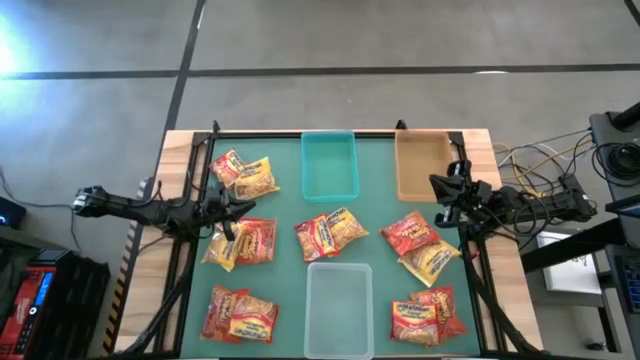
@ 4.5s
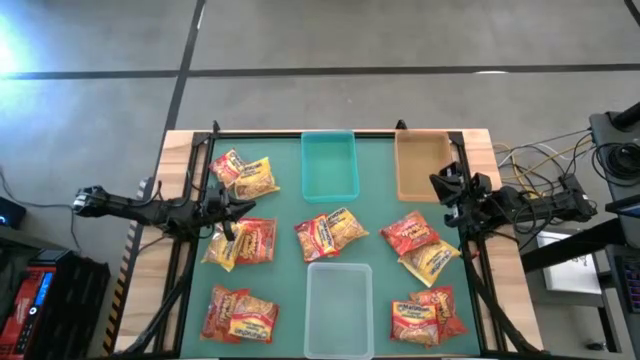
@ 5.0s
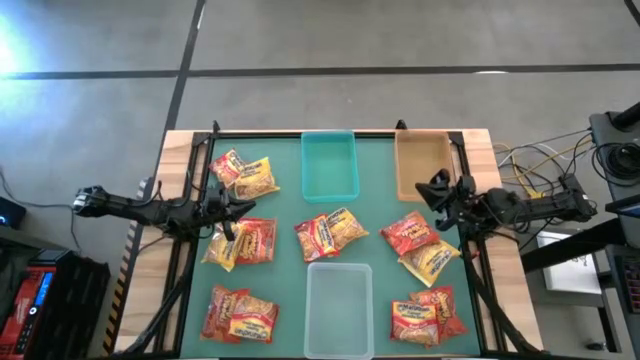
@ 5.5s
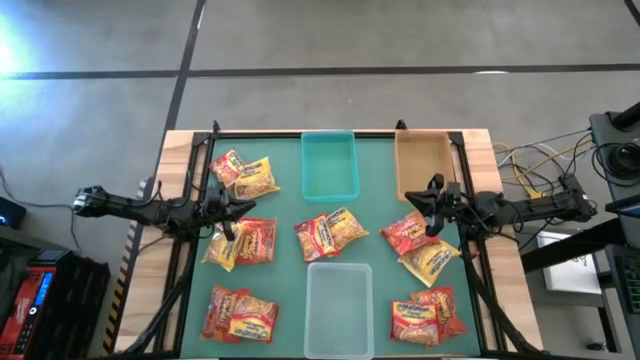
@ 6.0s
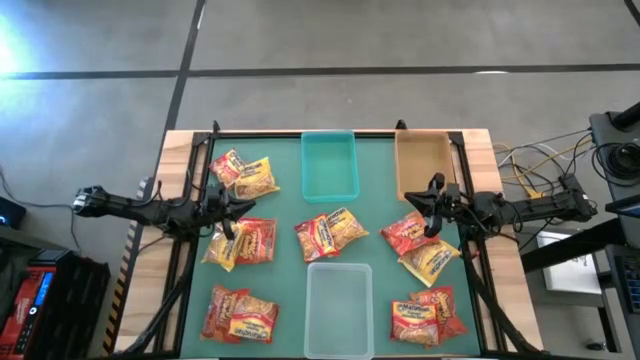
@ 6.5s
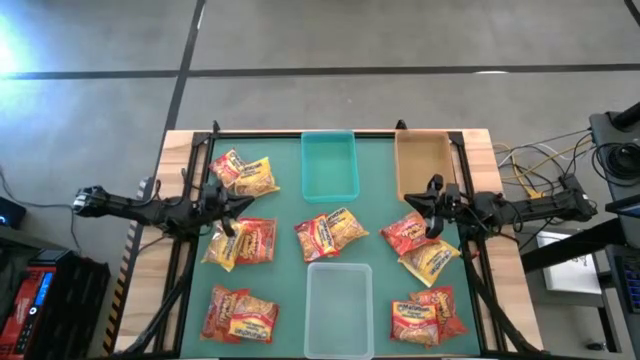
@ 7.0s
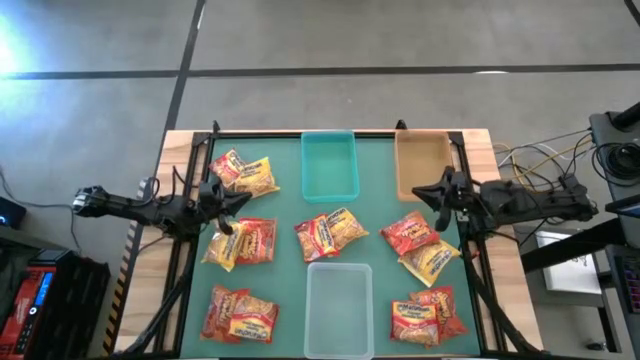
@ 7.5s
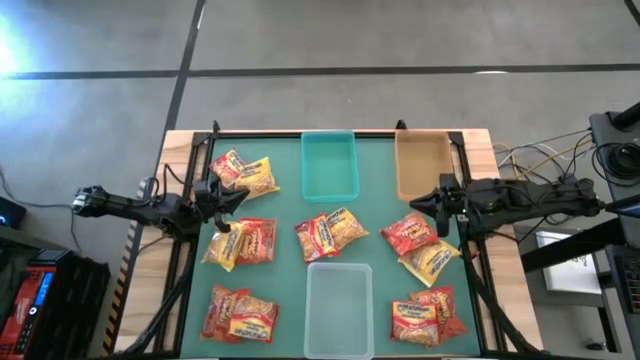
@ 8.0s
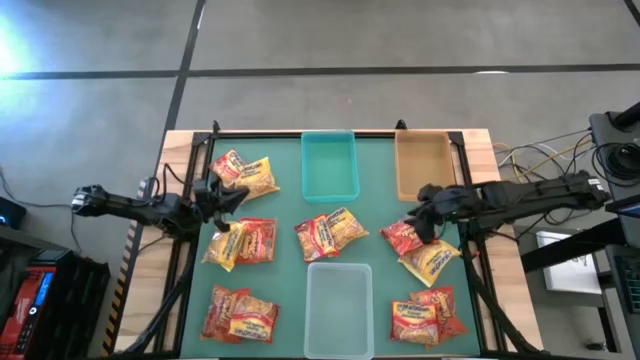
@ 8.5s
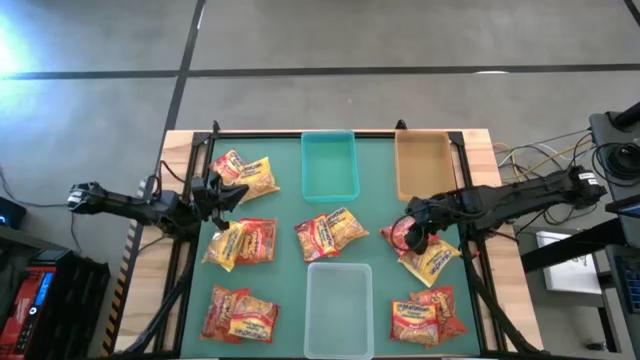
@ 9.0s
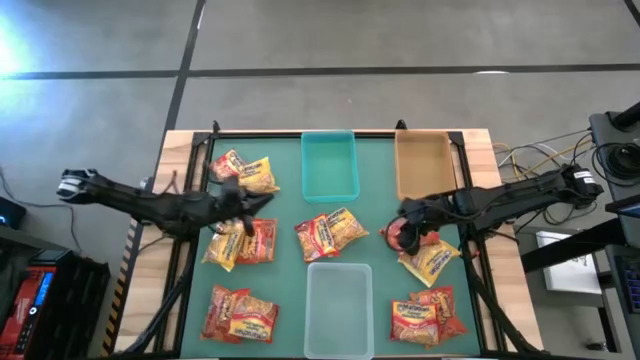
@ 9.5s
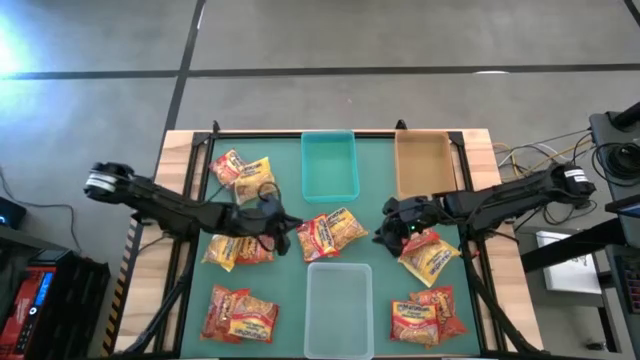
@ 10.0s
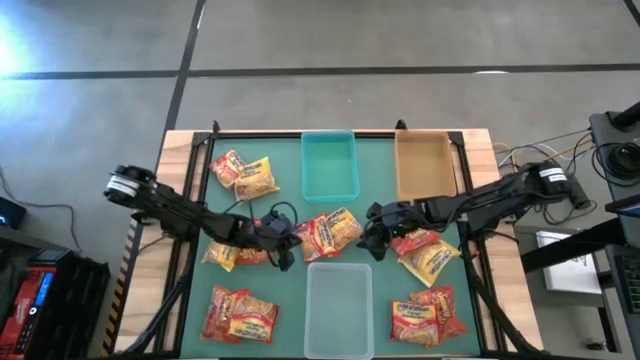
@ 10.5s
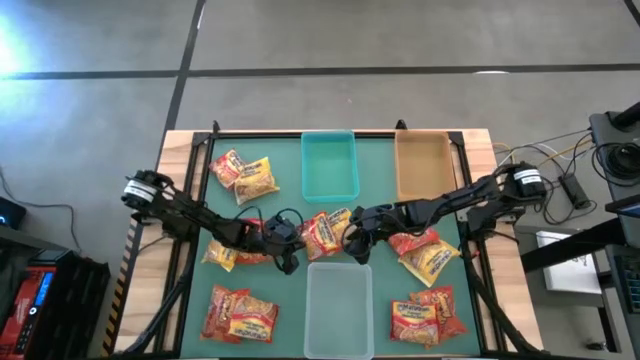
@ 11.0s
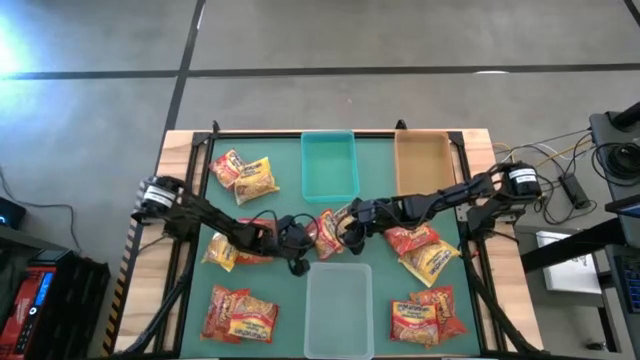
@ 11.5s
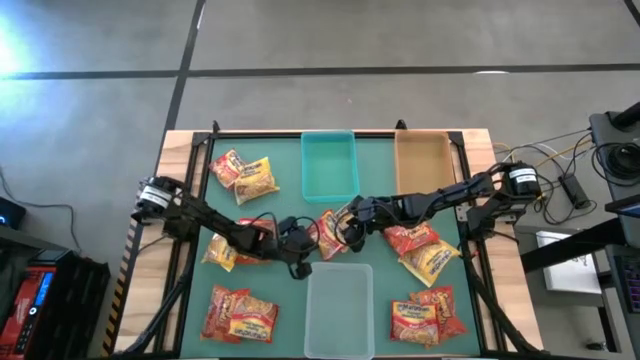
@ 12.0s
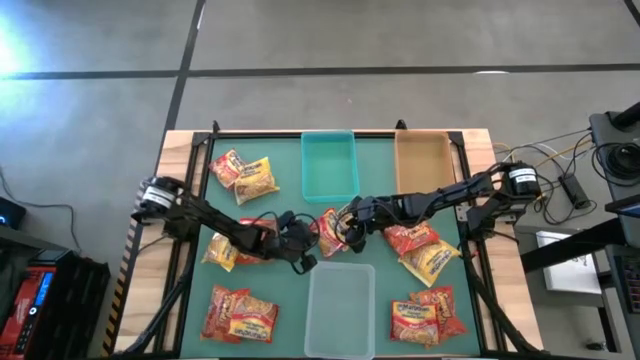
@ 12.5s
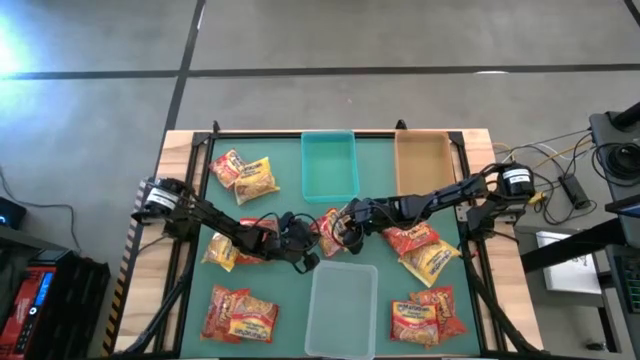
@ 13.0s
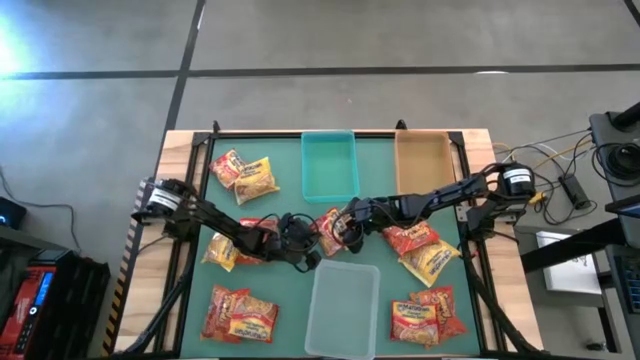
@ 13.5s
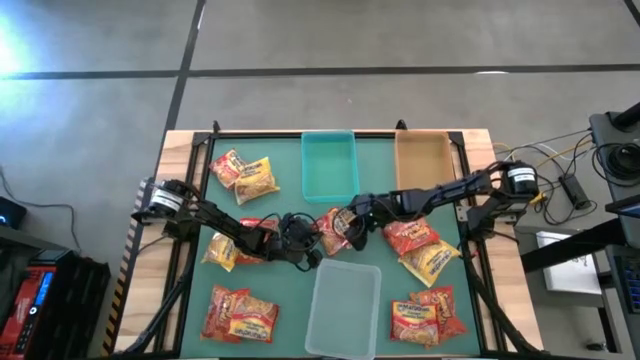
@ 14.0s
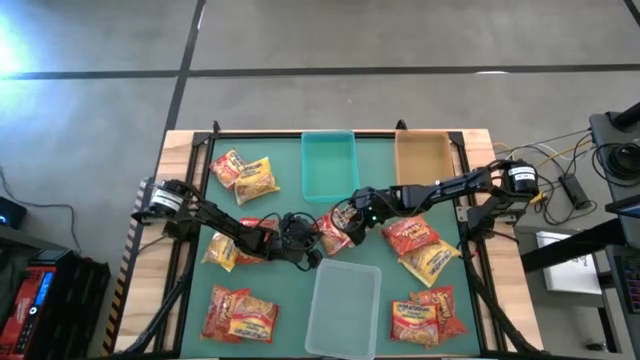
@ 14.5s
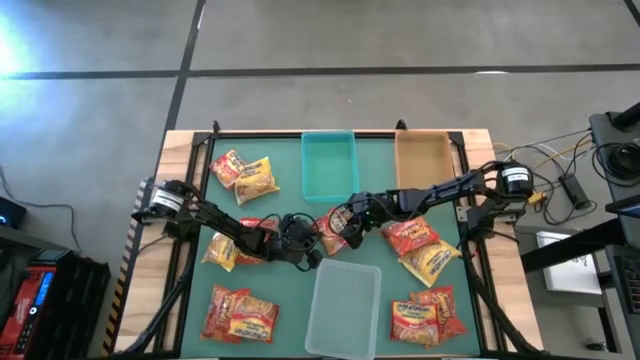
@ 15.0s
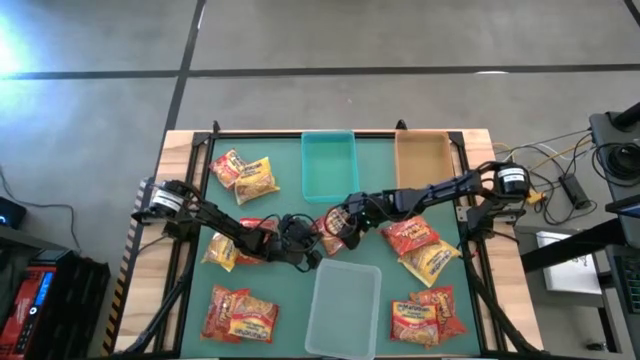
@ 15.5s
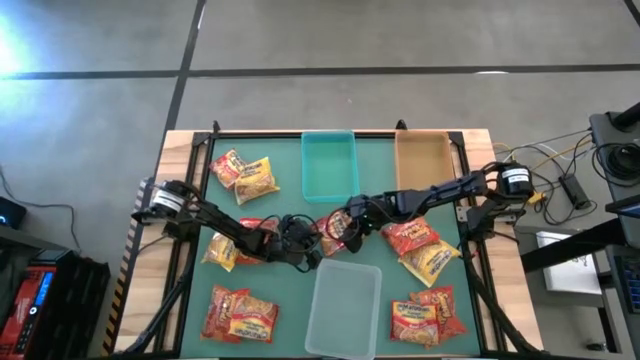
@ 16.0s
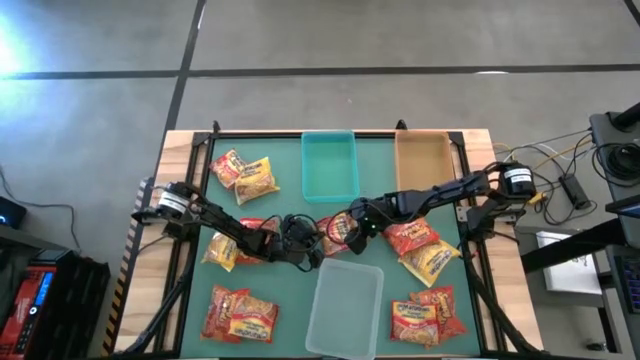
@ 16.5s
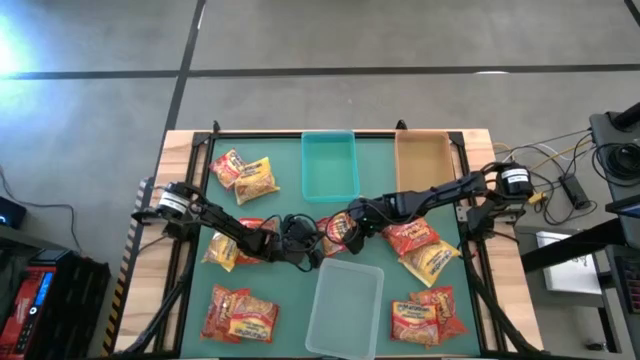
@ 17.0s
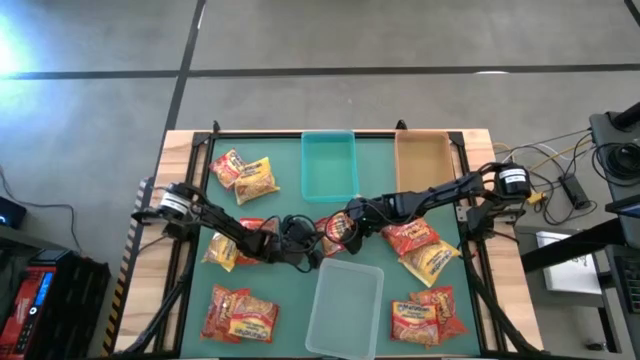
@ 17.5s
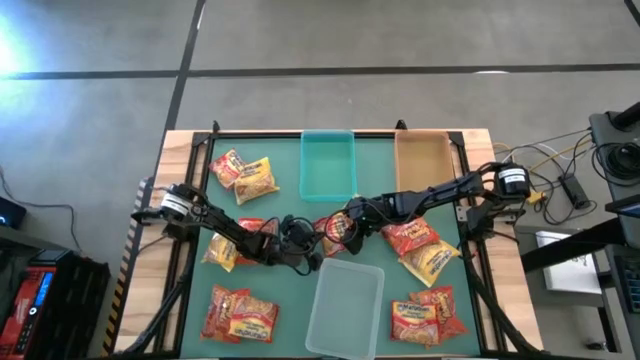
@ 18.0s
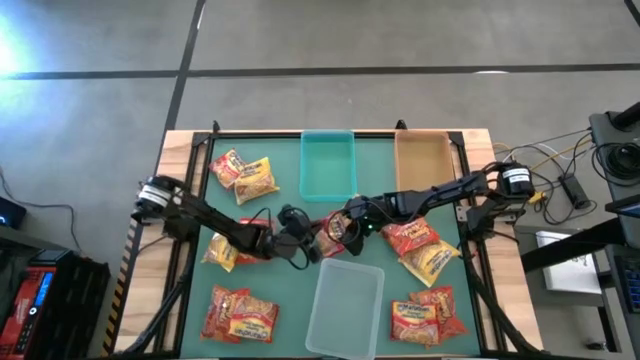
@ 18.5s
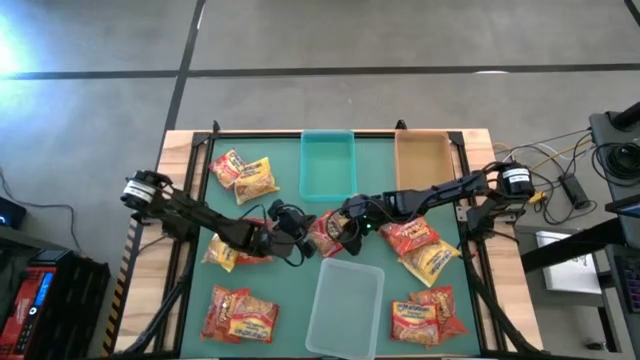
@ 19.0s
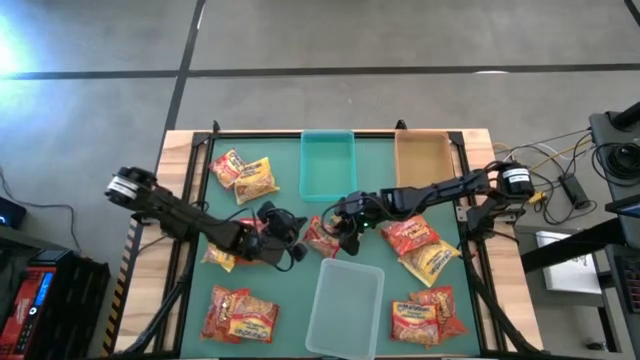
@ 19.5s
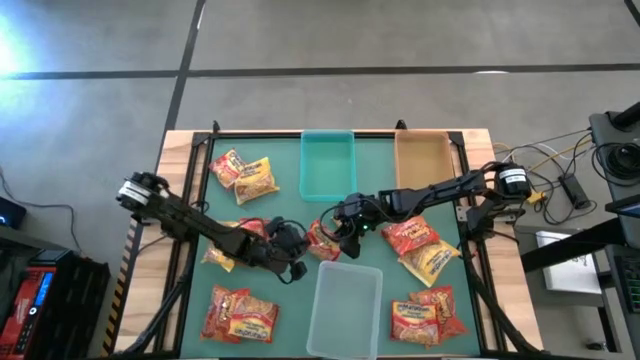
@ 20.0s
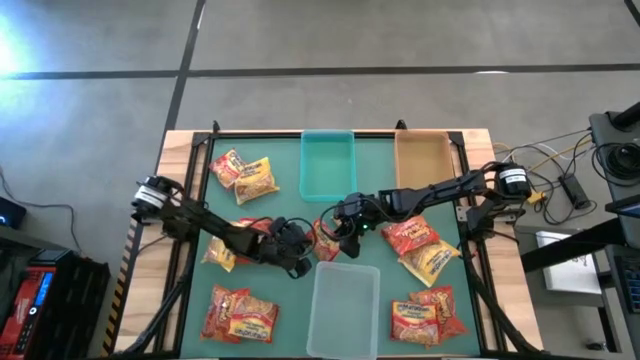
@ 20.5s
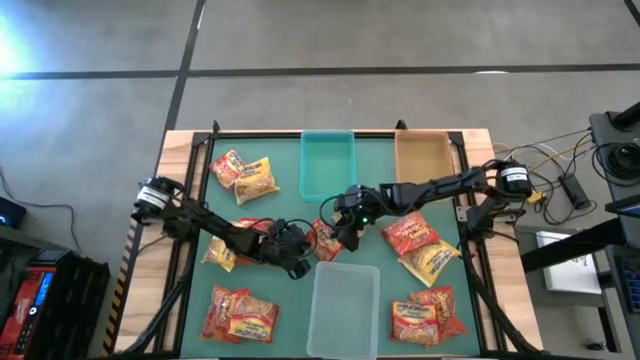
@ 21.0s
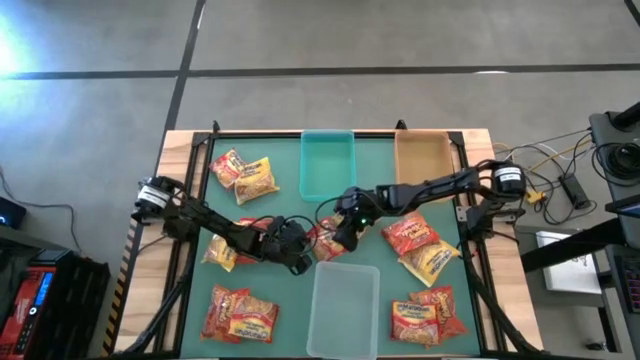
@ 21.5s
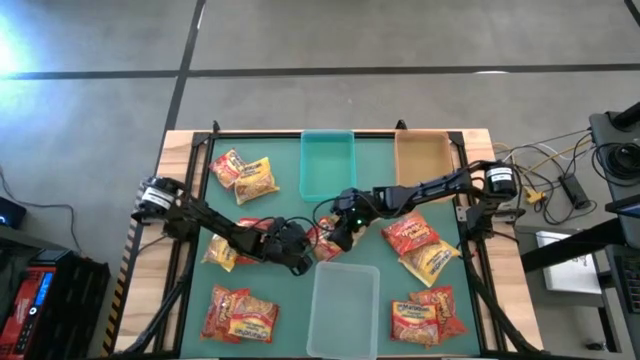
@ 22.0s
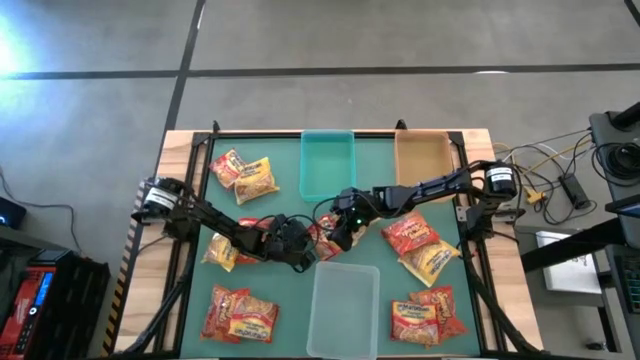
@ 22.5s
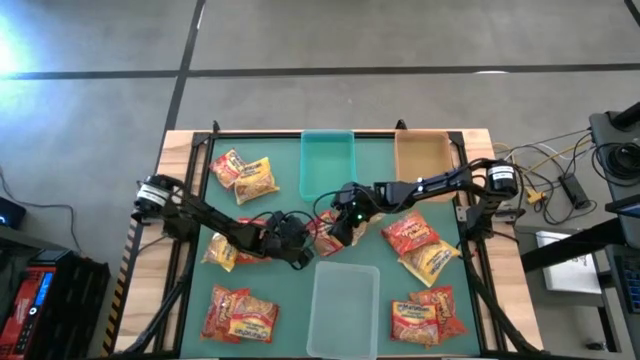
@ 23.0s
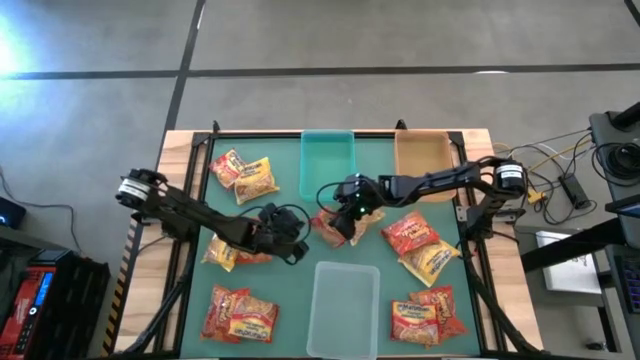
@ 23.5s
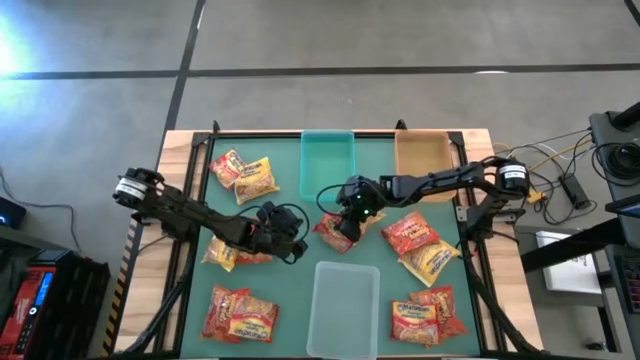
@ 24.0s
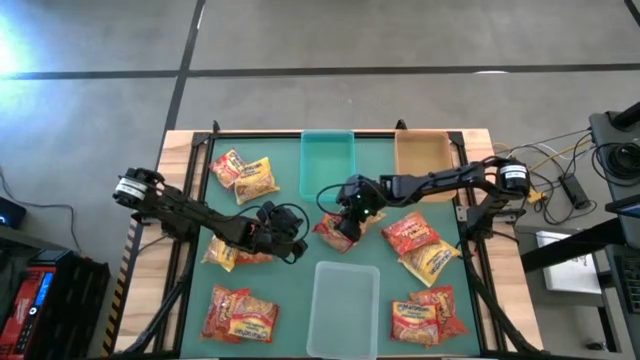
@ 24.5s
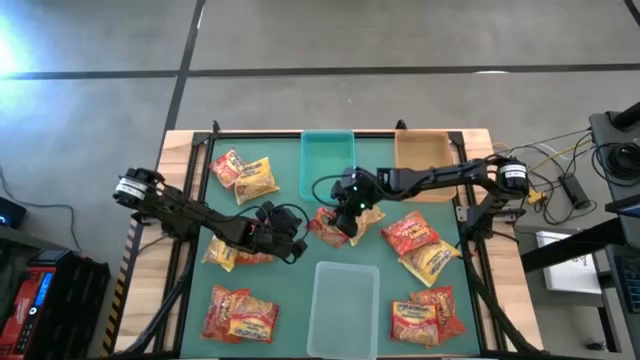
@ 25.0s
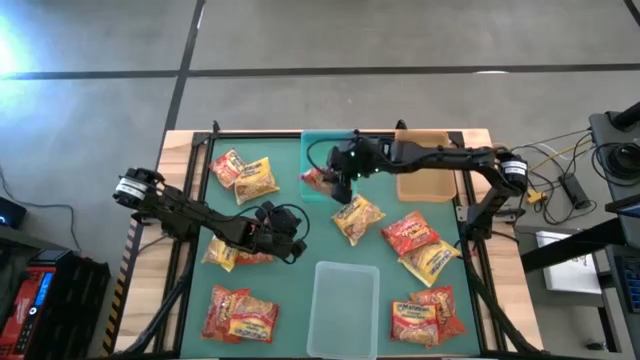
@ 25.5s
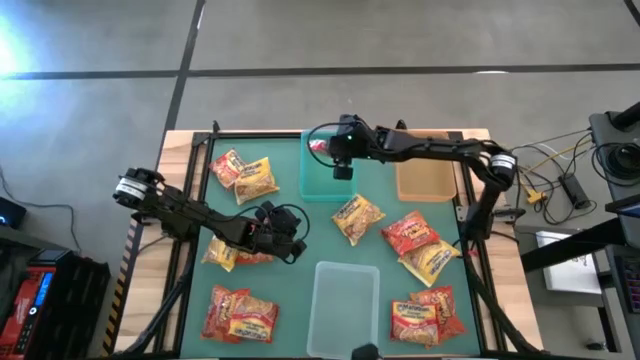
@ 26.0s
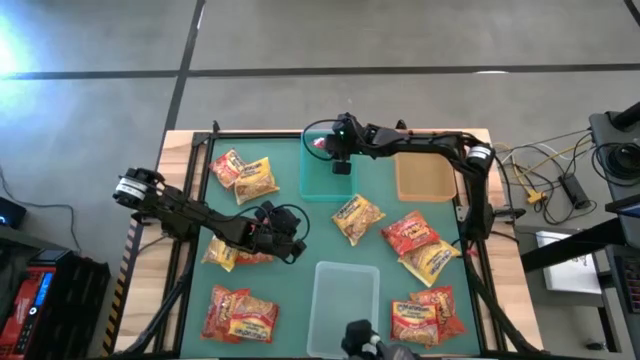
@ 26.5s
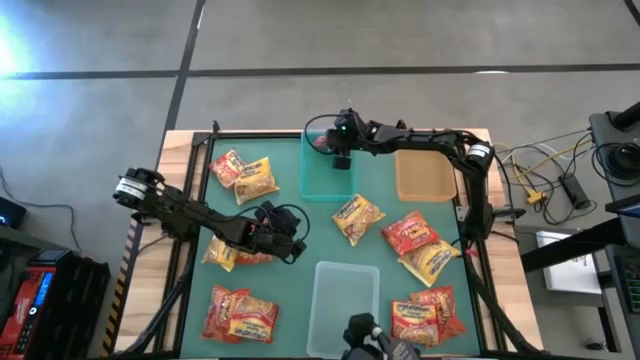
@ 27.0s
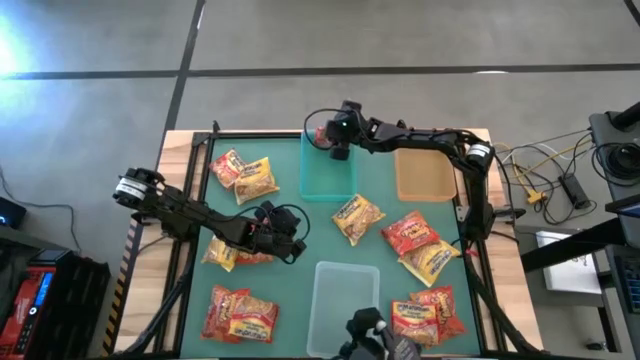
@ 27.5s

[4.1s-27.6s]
Task: Sort Maruchan noodles
Put the center red noodle pack into the transparent green bin
